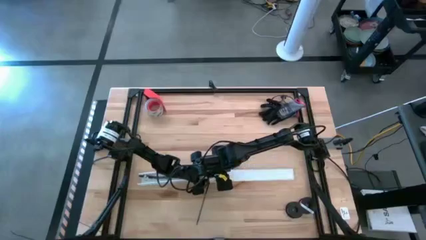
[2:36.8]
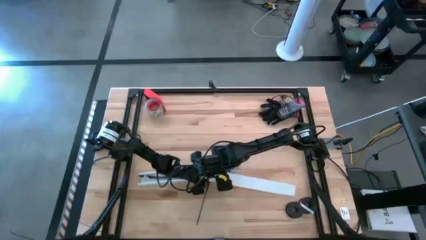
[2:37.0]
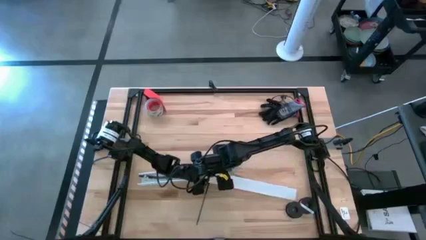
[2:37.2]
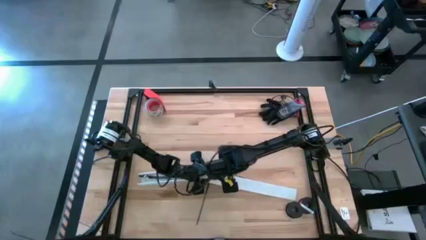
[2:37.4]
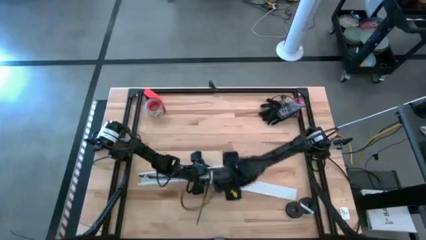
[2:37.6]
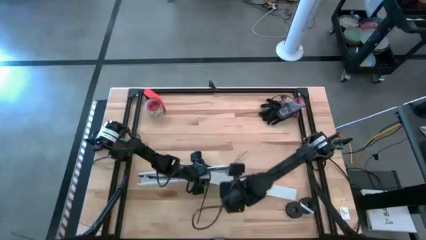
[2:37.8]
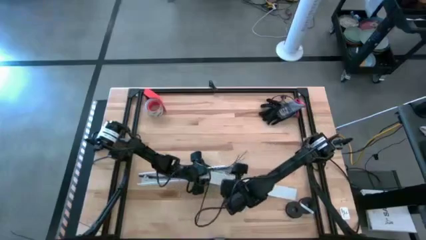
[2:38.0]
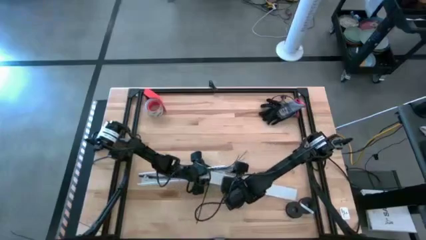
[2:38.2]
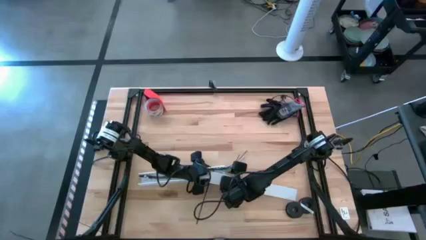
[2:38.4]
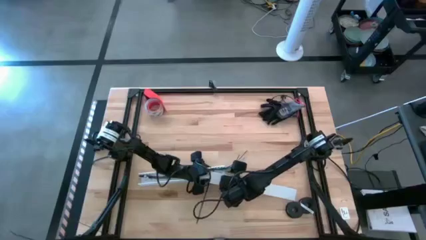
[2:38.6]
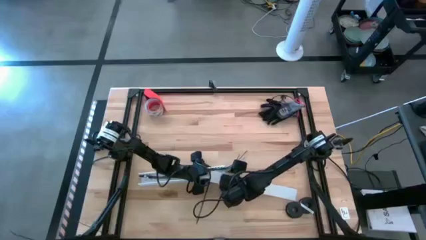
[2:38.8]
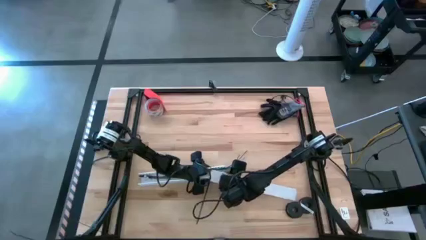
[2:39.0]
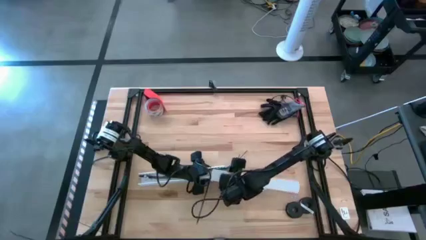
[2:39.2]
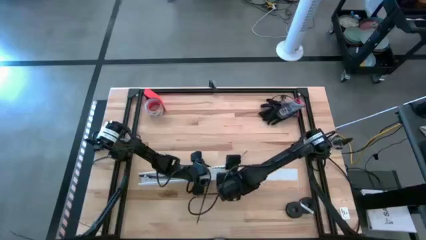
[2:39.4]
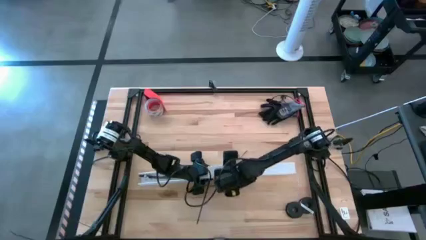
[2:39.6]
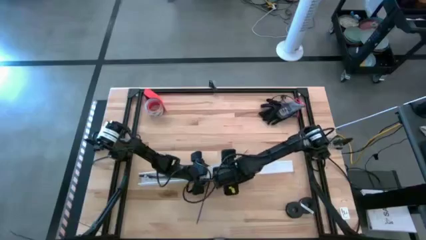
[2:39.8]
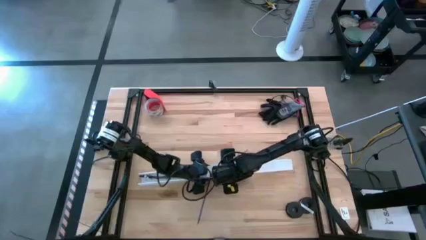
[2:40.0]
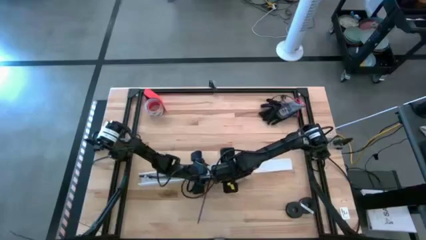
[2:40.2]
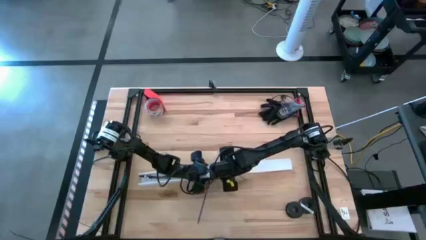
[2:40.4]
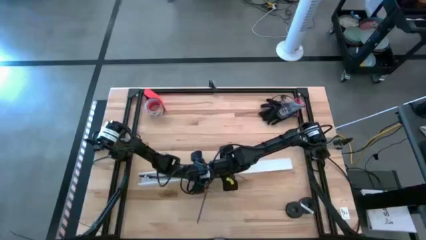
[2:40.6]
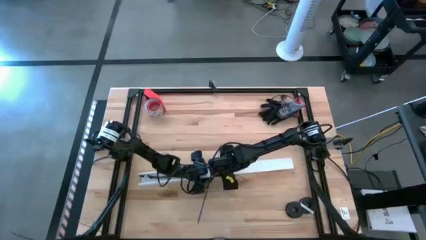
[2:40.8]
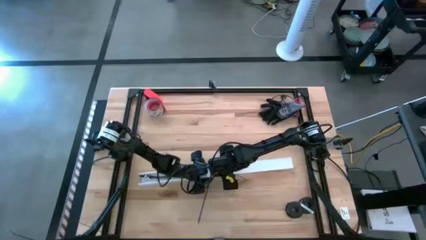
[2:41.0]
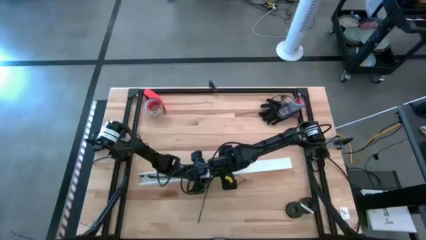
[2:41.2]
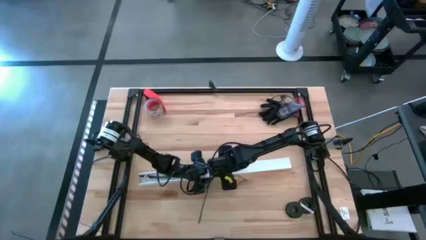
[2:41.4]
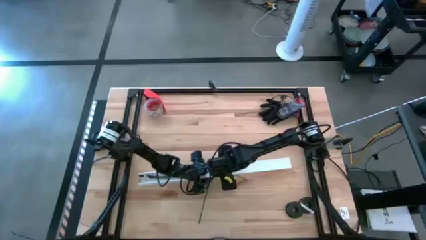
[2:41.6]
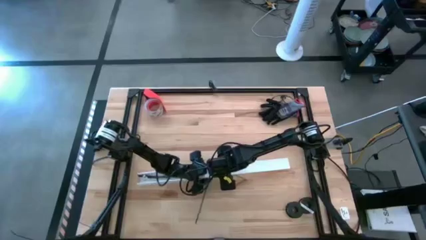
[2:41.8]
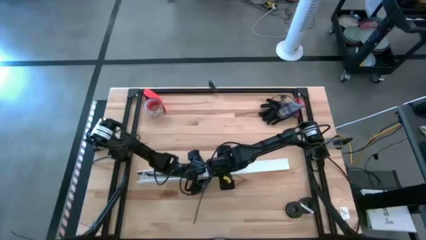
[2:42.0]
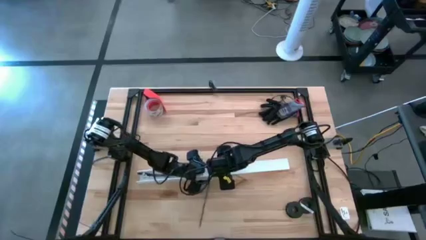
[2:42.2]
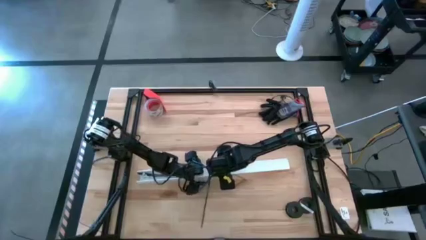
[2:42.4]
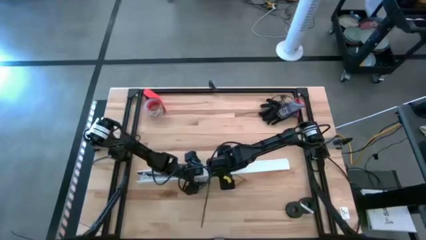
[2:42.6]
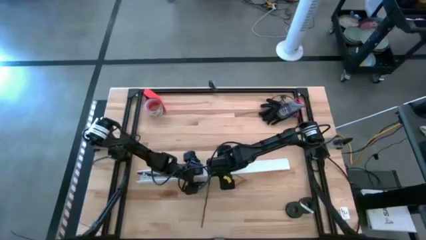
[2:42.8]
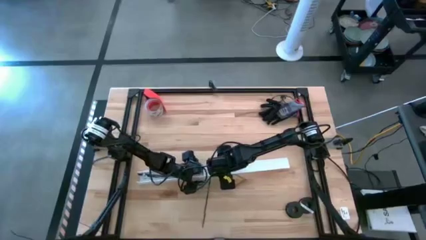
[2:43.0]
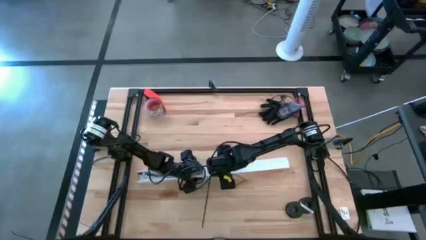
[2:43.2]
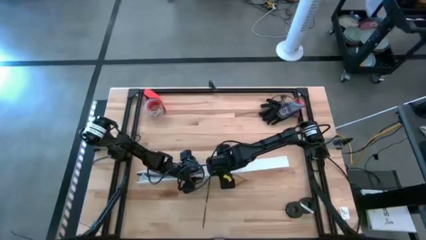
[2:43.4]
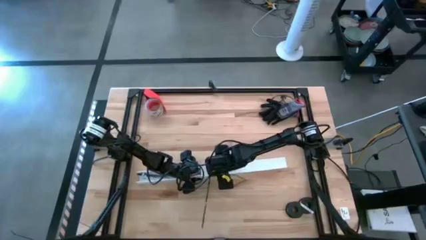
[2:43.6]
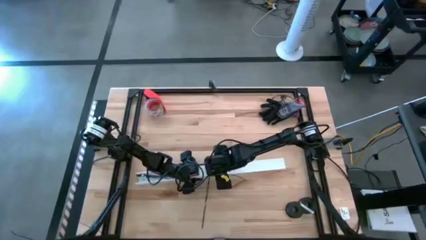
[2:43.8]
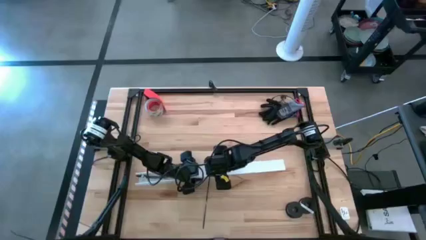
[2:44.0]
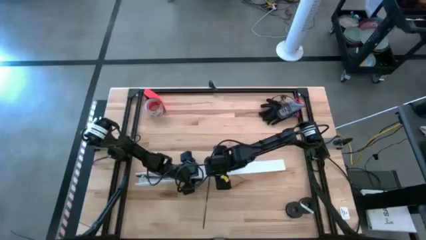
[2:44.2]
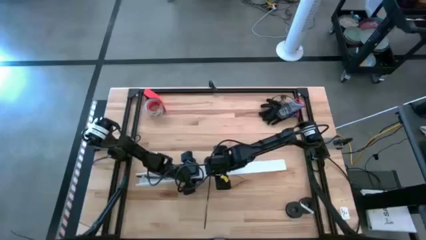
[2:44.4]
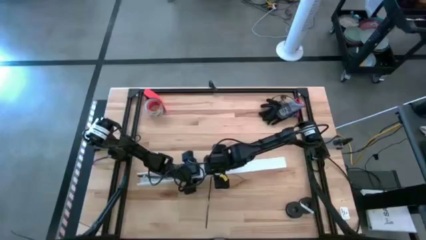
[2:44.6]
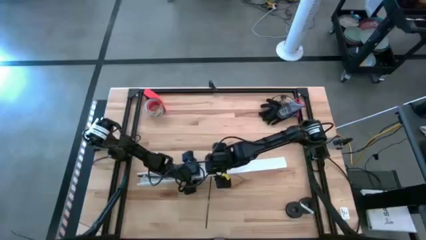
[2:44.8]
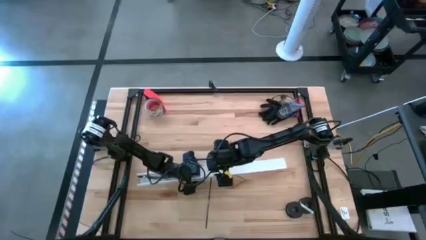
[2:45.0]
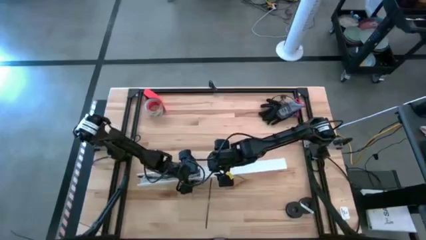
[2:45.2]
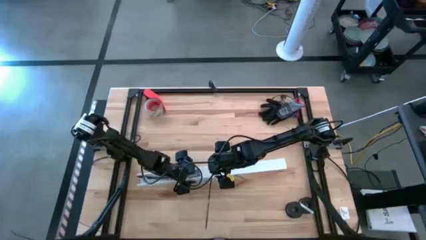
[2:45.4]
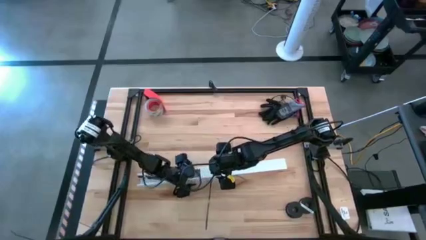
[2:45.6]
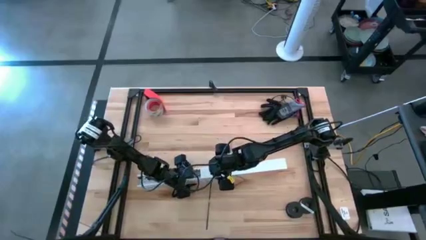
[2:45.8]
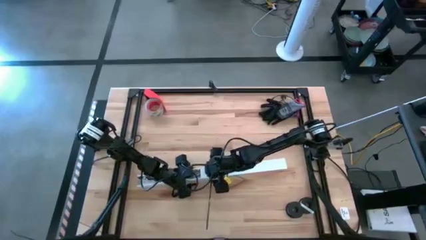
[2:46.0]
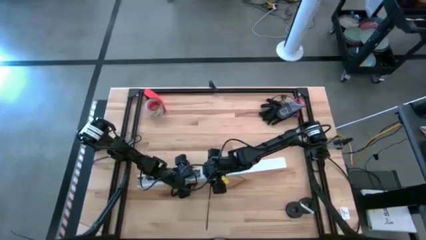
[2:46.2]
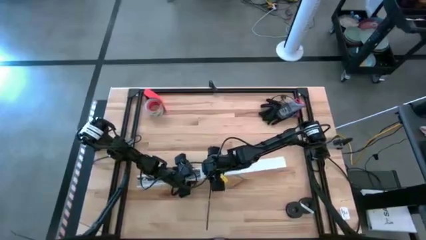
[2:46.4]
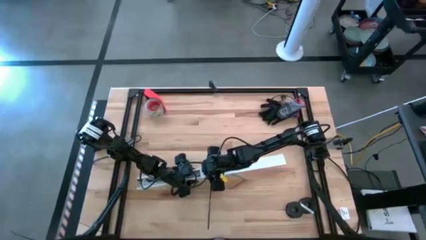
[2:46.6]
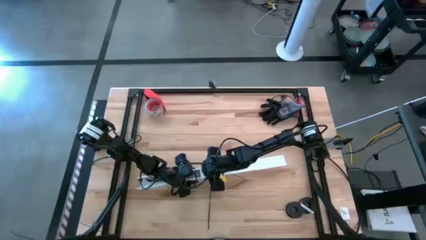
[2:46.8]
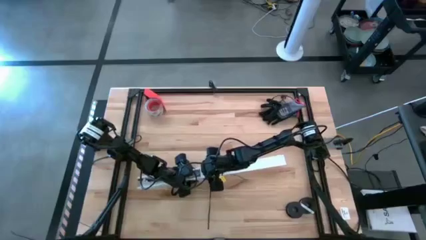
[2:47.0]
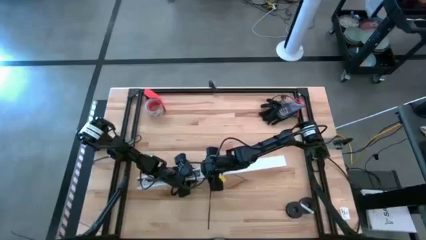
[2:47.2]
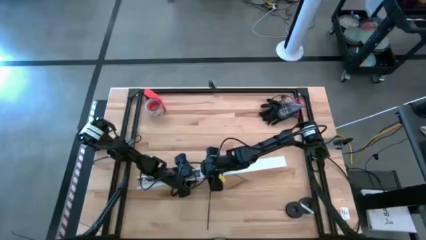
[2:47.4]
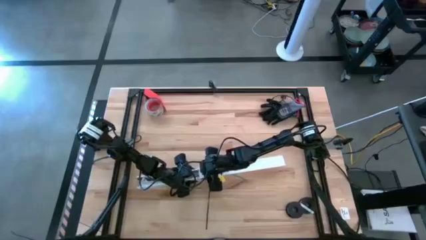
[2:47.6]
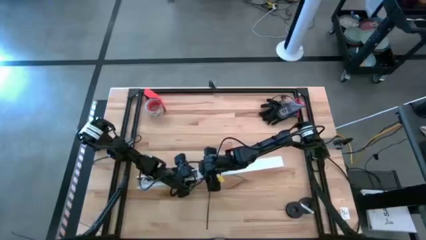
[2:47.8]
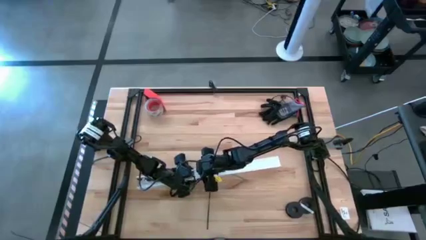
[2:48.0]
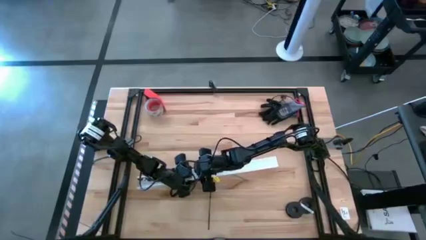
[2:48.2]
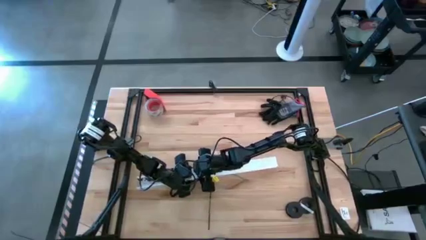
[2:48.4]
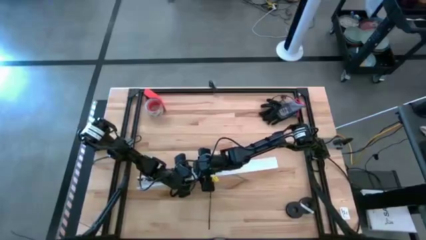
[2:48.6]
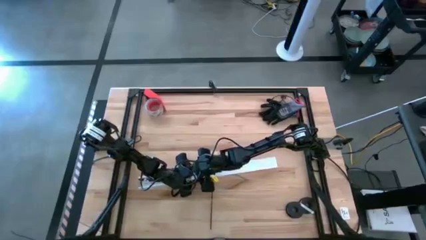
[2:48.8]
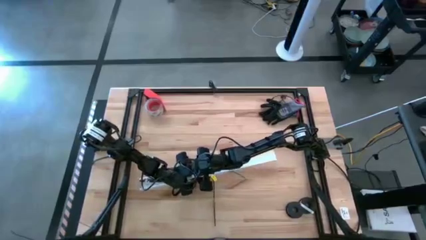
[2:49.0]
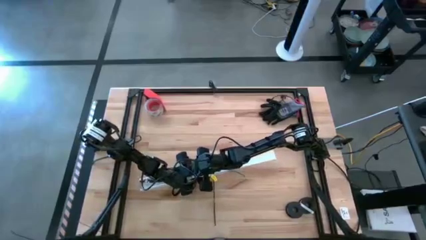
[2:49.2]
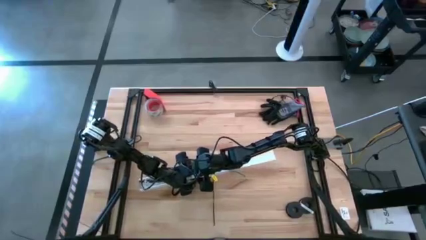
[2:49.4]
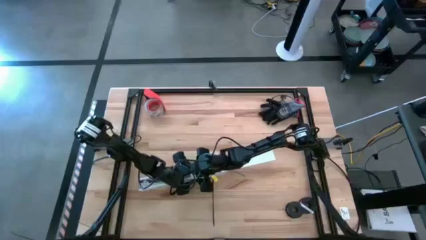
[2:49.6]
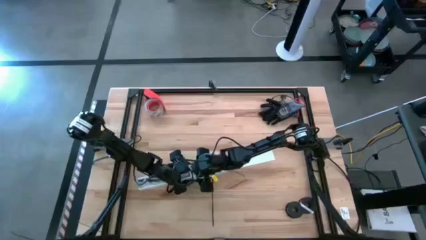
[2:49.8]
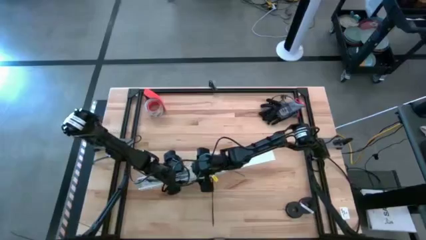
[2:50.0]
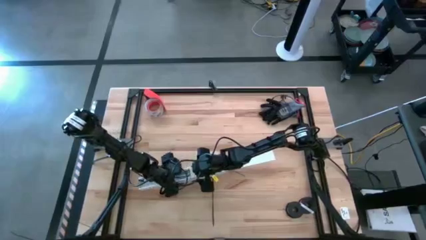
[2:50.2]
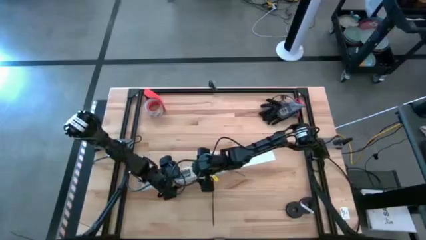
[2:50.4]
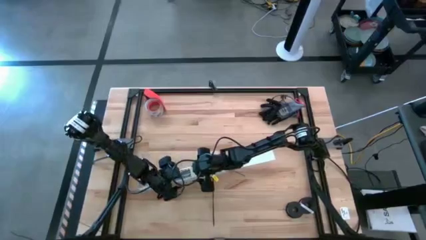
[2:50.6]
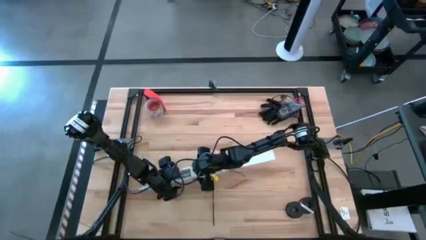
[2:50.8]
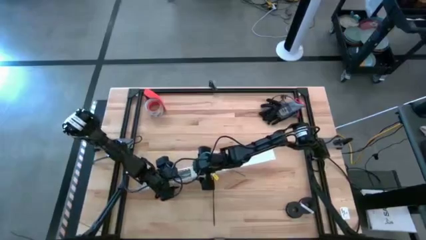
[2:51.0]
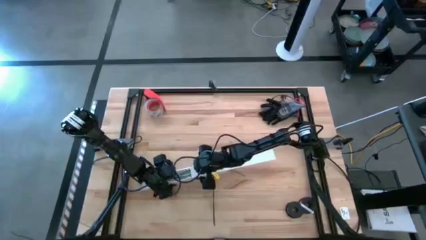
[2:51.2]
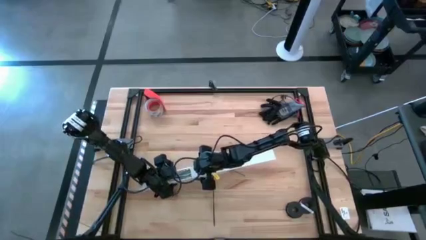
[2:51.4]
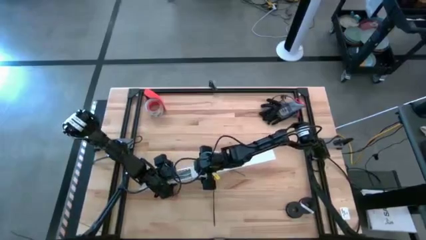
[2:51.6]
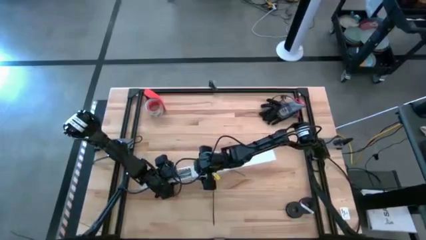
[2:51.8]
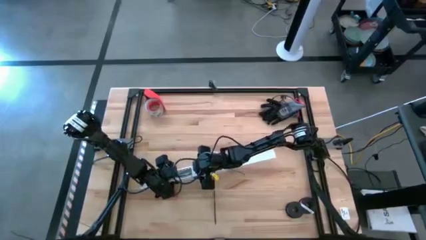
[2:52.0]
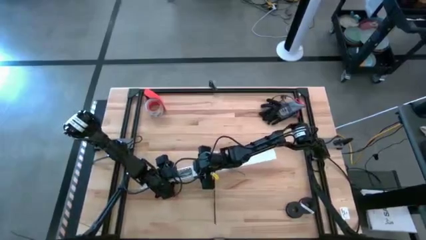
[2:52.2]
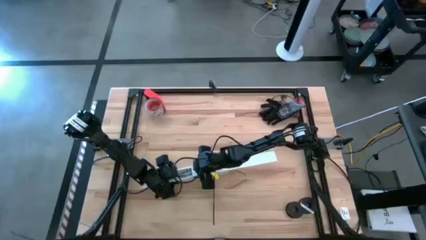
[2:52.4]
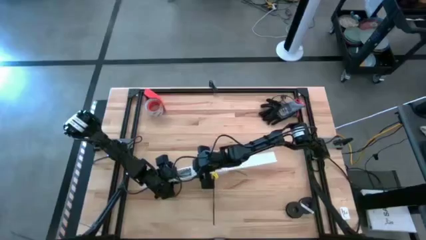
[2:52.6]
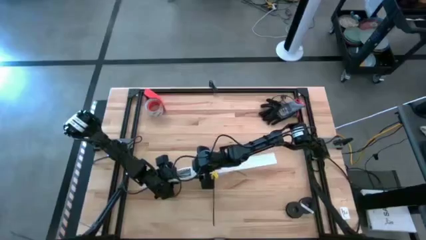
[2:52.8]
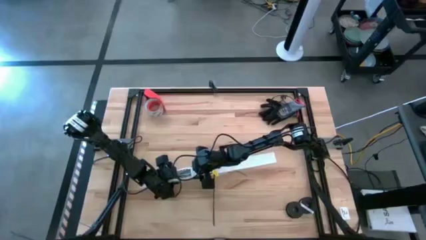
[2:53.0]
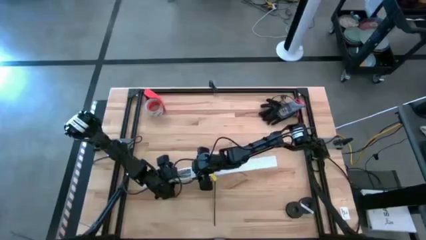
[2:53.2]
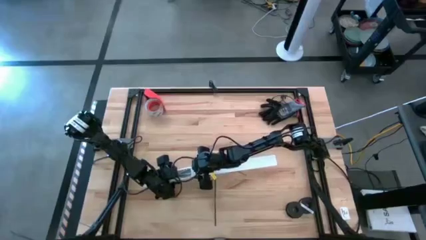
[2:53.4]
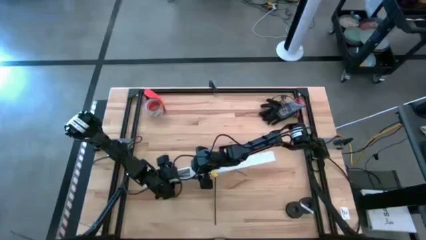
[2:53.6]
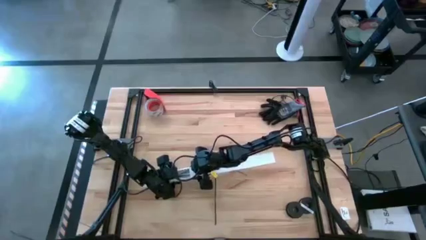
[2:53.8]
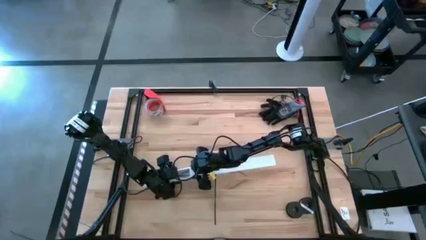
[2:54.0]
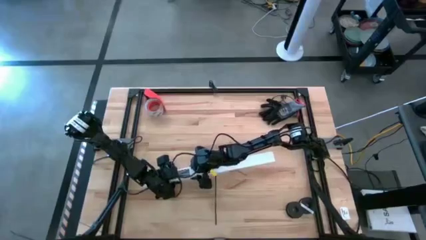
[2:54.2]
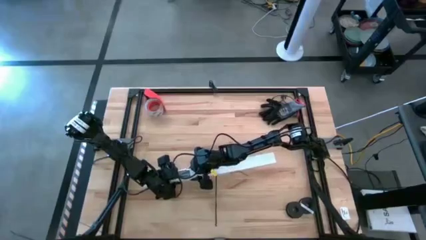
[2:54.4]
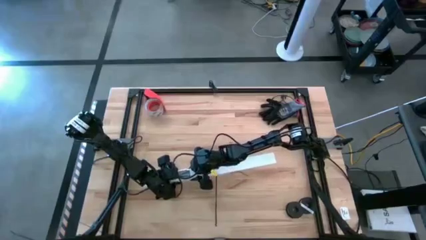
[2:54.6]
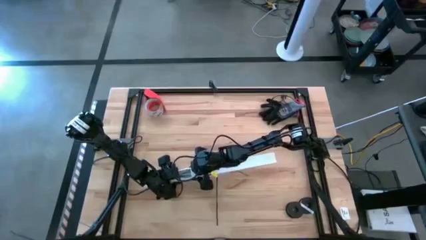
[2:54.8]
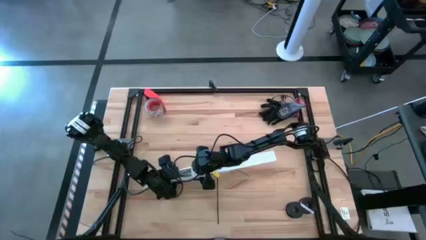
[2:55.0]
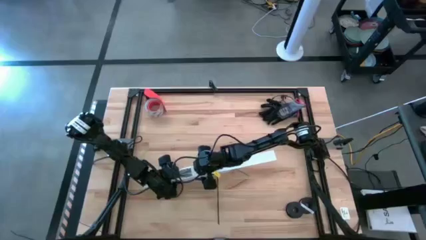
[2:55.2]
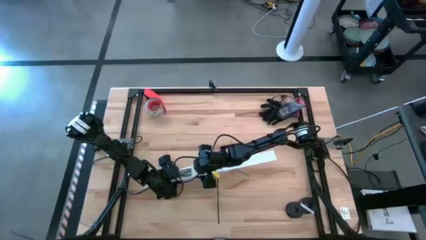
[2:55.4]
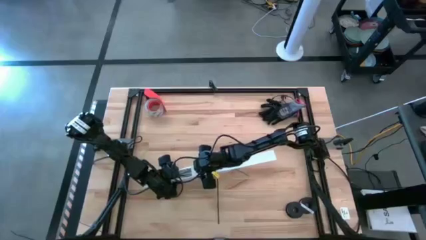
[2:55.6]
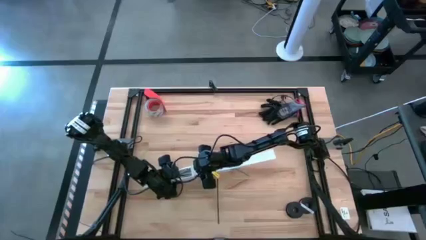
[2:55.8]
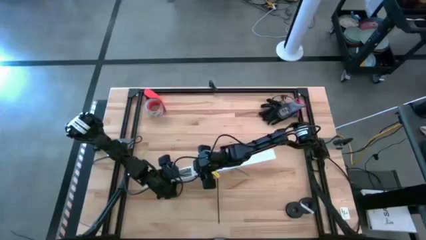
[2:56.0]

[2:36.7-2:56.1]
Task: Ziptie cables
Close the cable duct
